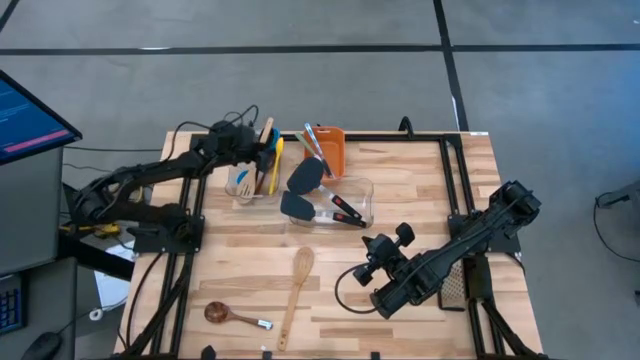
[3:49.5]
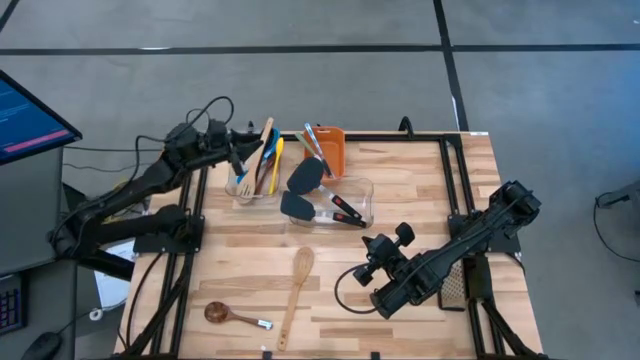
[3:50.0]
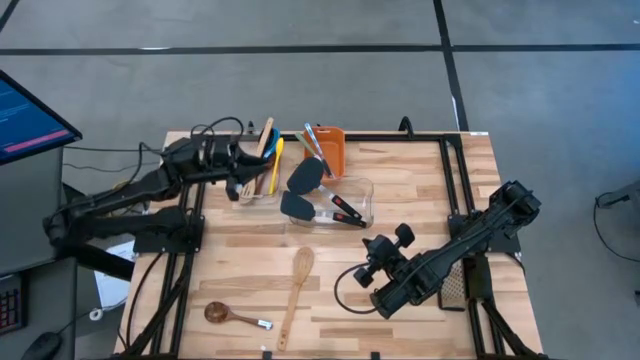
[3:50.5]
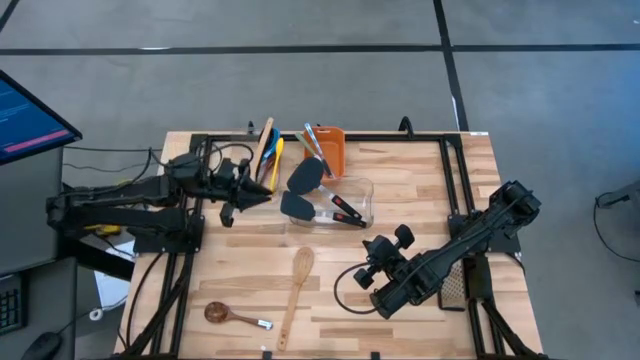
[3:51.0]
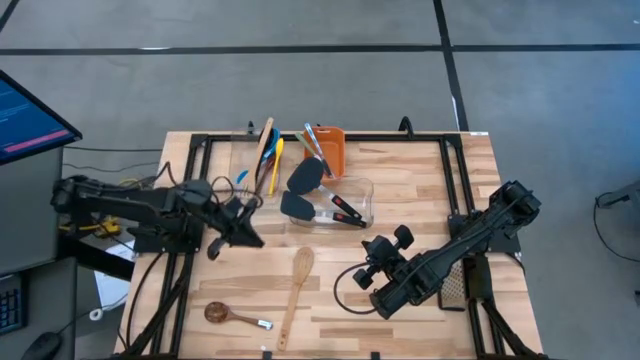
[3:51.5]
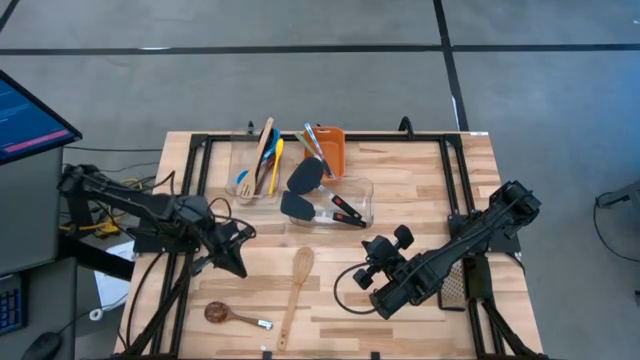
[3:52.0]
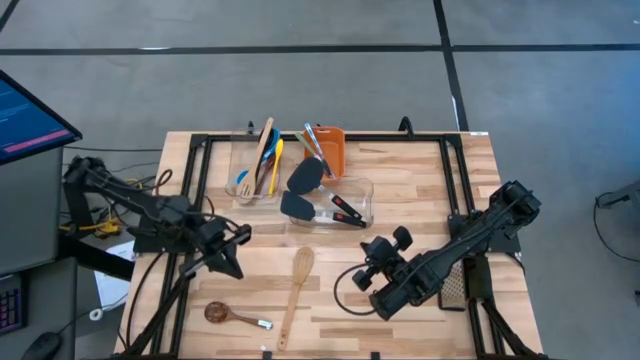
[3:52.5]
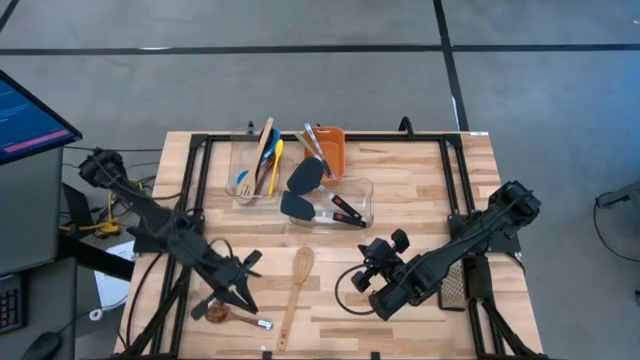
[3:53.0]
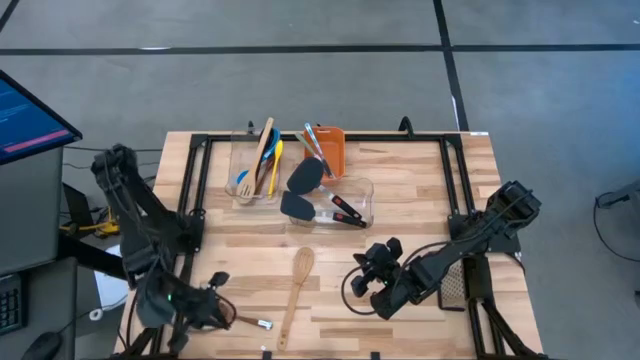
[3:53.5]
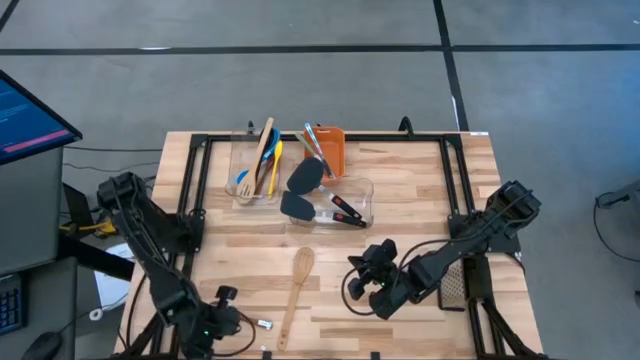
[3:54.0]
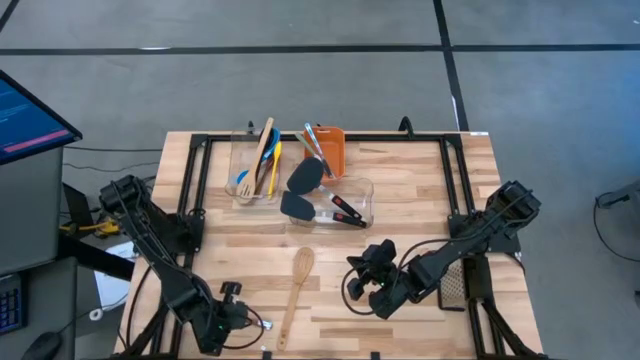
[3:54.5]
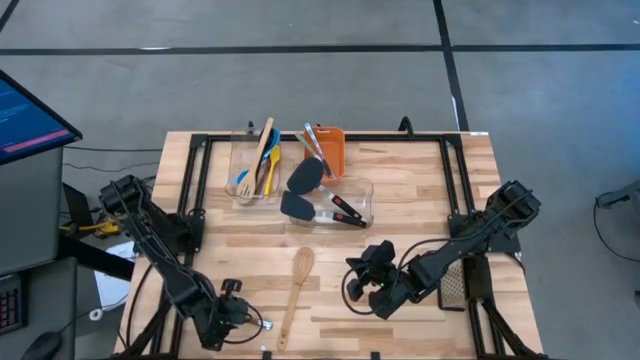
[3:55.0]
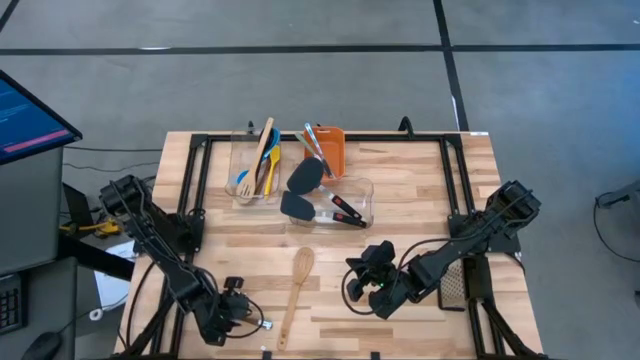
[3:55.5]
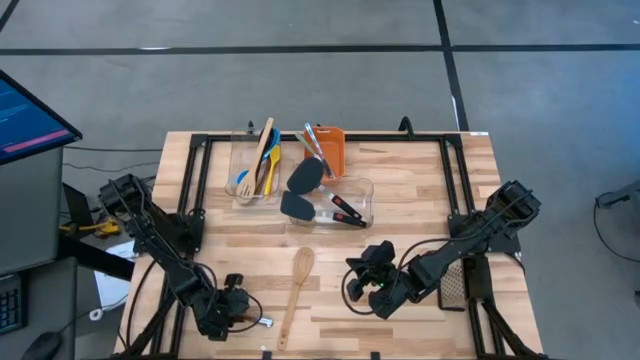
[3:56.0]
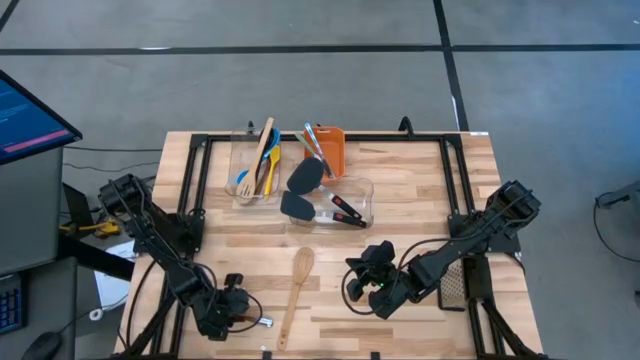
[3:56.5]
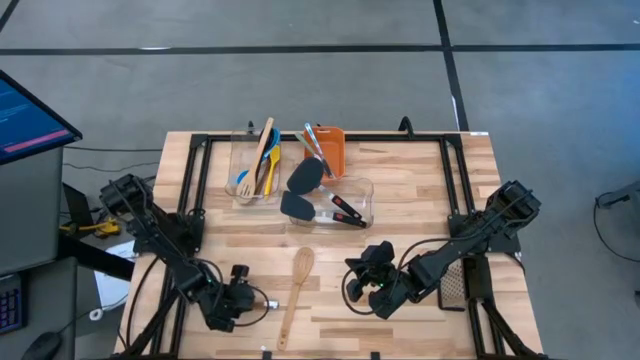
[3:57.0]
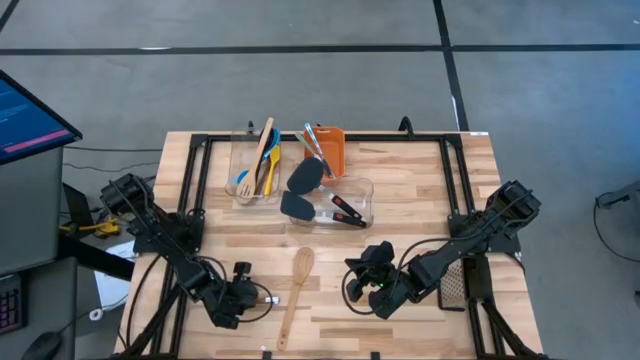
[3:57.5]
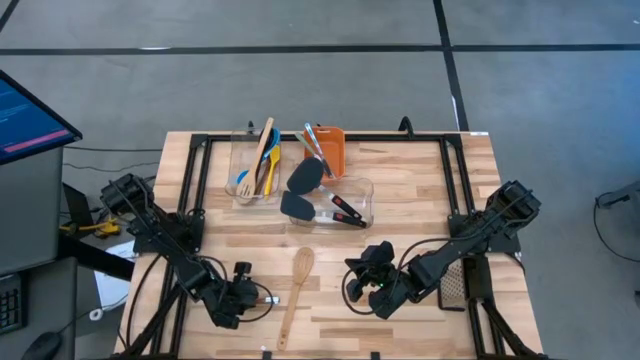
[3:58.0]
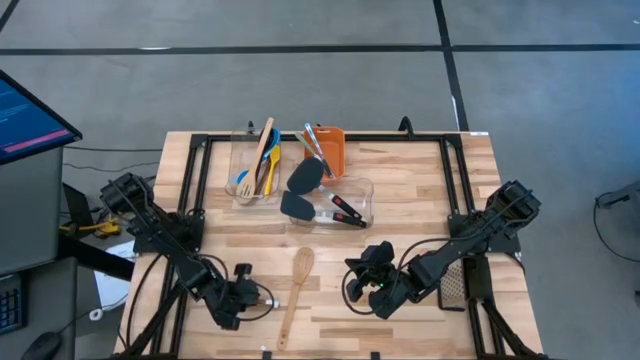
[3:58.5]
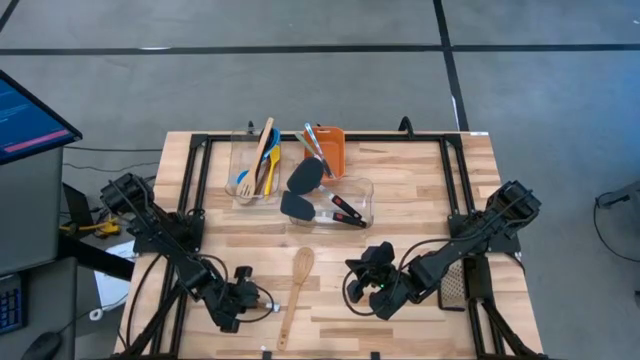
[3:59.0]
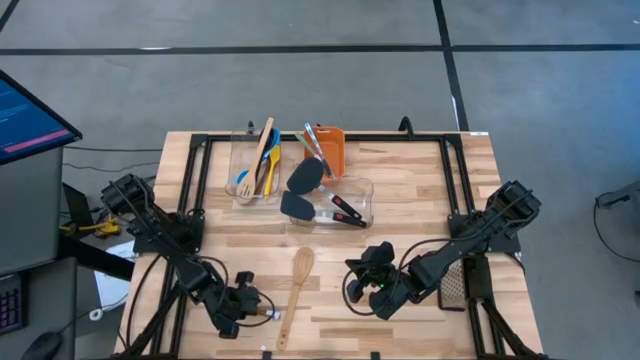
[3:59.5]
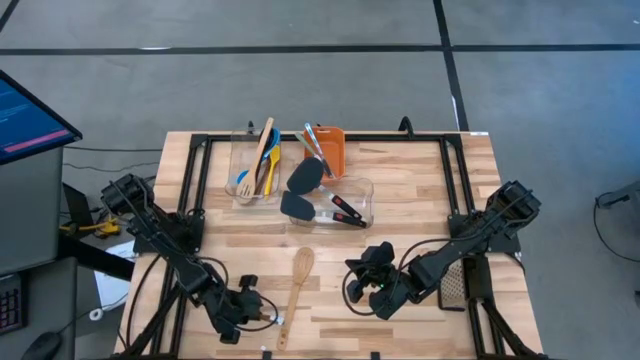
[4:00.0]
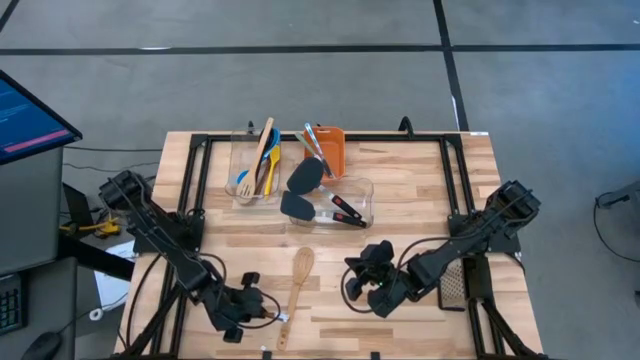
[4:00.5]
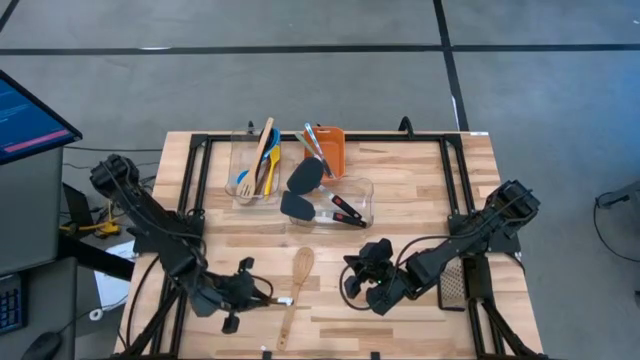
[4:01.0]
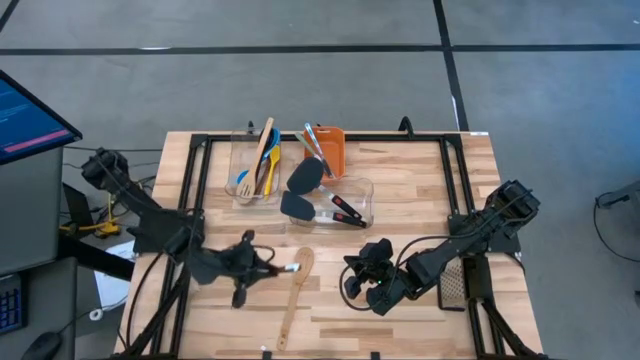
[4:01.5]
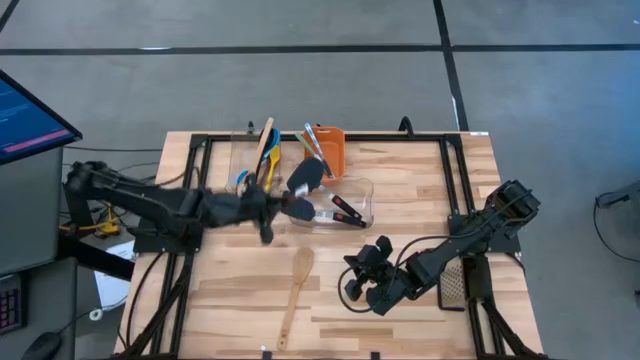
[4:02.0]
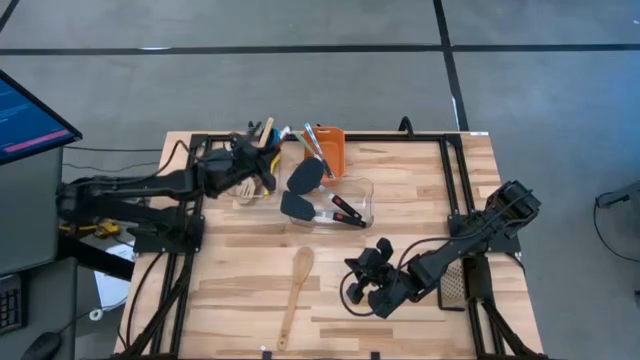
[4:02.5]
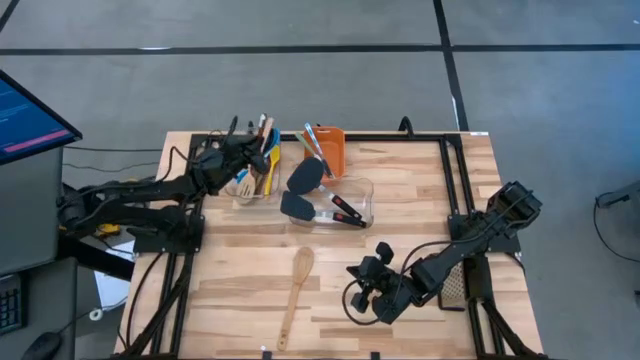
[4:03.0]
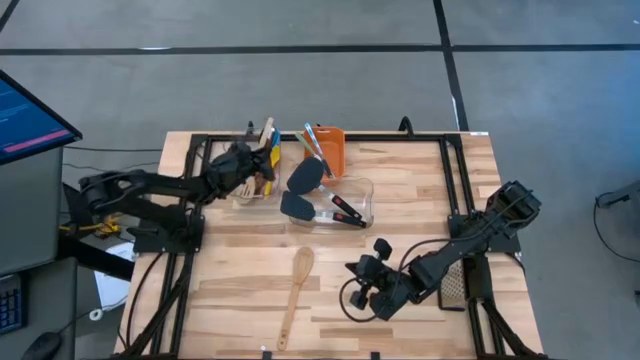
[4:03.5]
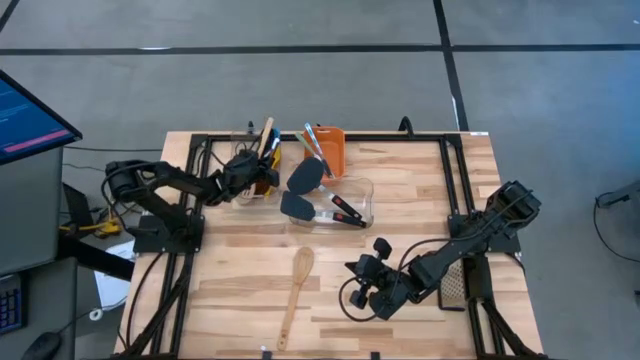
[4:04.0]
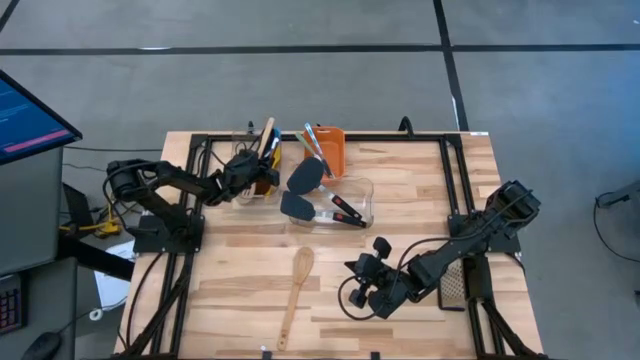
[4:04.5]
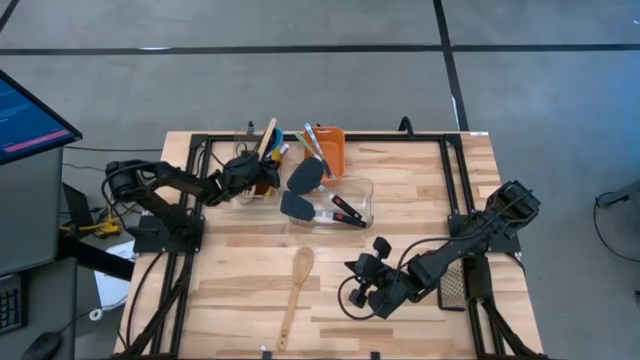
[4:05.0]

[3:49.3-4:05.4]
Task: Pick & Place Kitchen Items
Put the dark brown wooden spoon into the top transparent bin

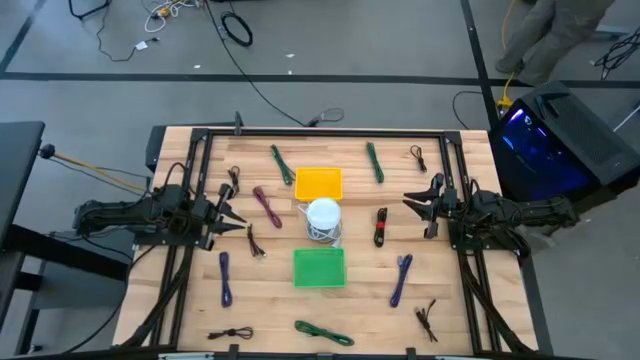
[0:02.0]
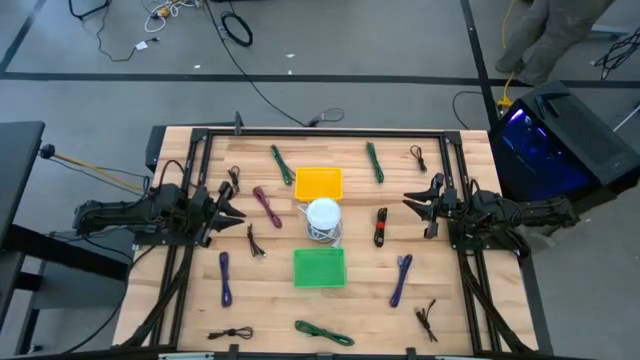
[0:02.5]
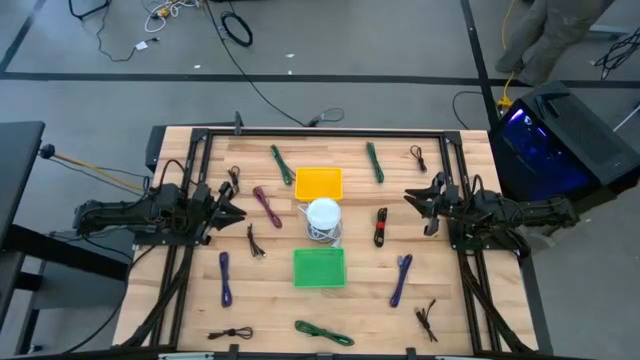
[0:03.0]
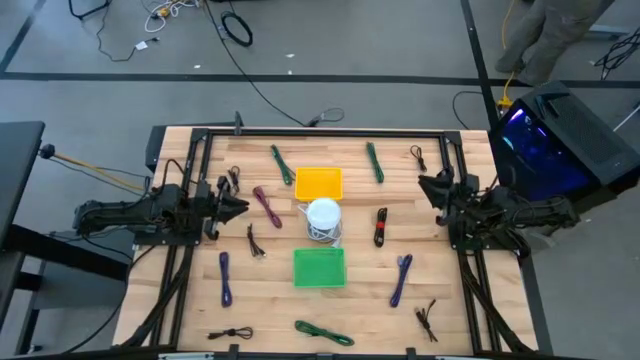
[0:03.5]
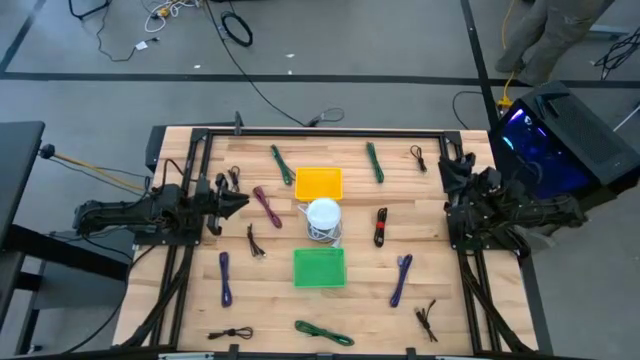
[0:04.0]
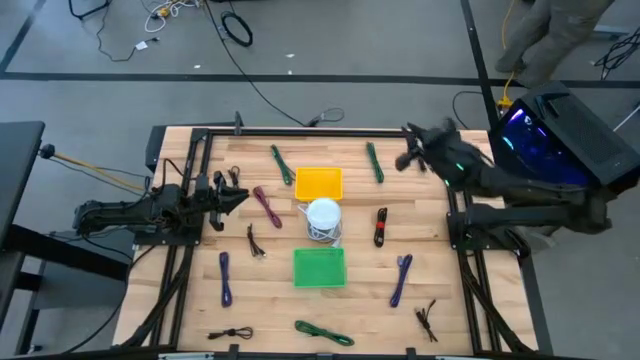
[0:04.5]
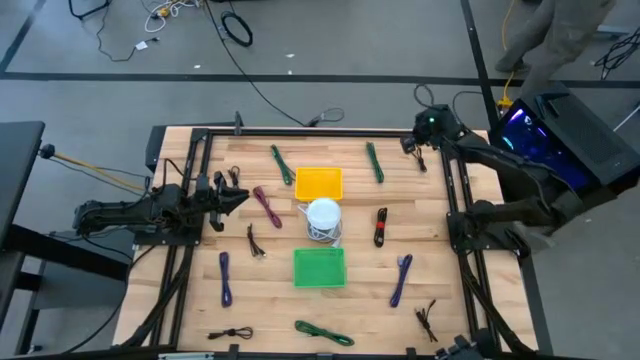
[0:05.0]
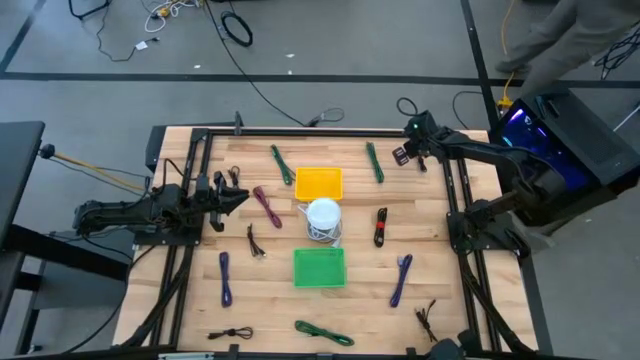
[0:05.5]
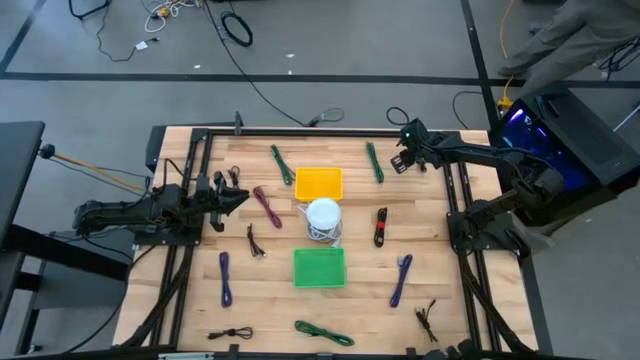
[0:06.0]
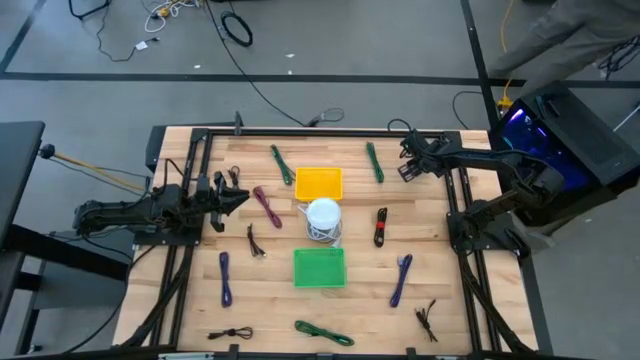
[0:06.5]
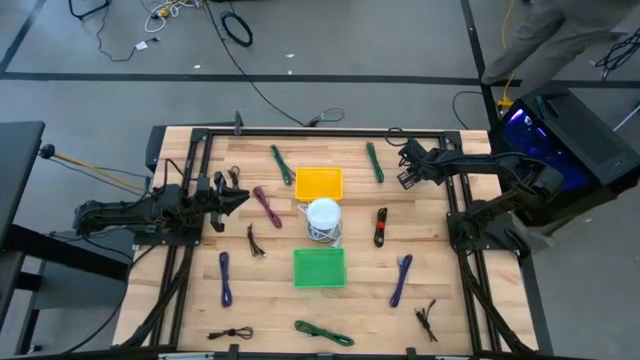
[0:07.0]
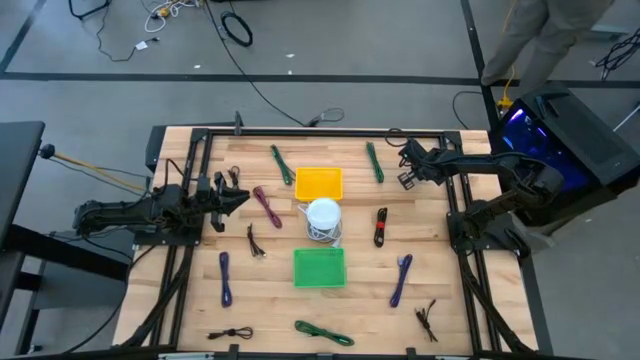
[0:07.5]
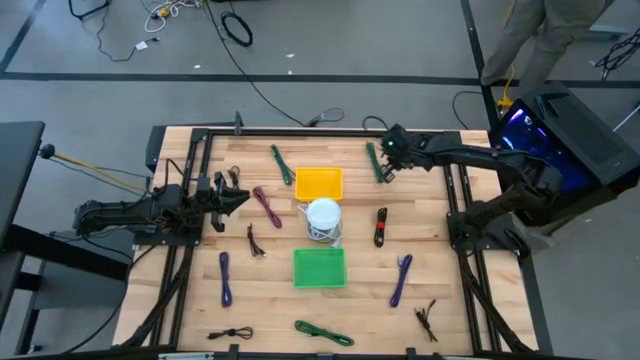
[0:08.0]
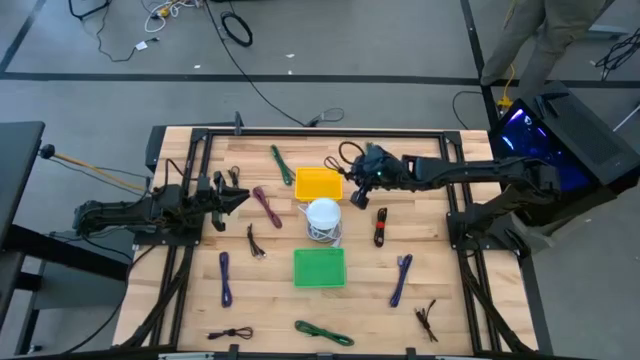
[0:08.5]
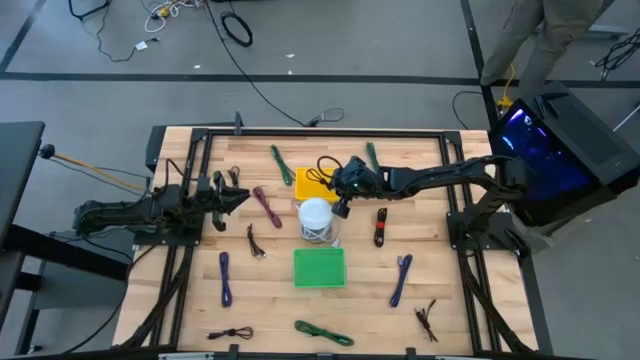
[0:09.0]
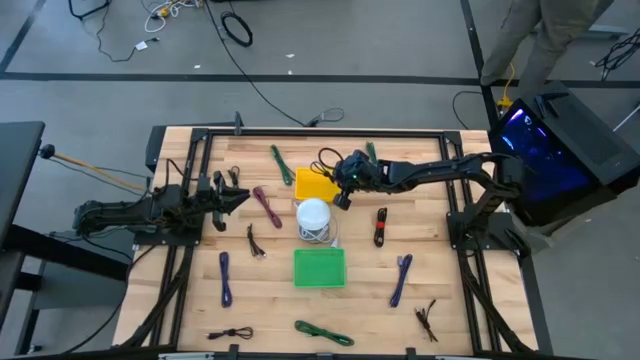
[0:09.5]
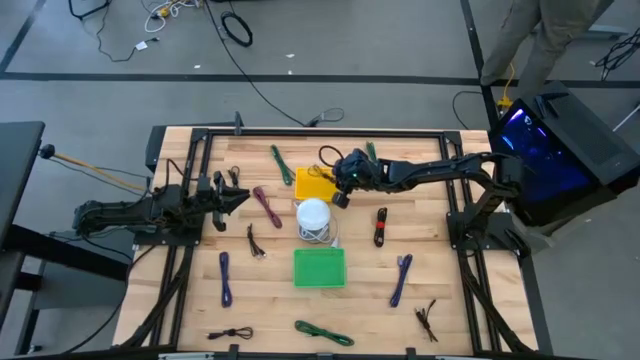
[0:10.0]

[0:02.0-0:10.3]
Task: Pick & Place USB Port
Put the black USB cable into the yellow bin
